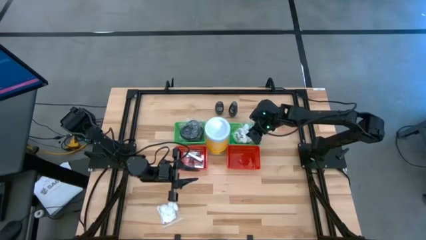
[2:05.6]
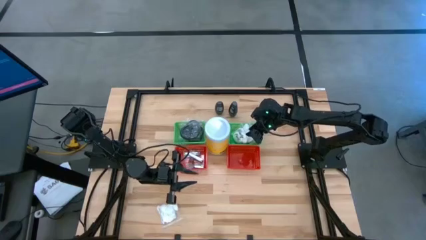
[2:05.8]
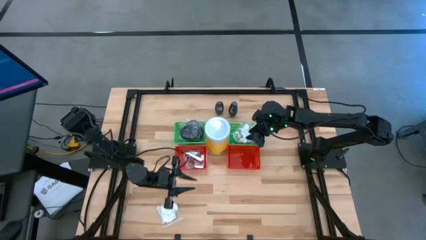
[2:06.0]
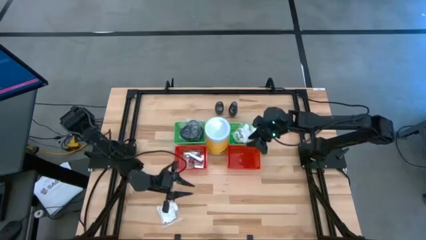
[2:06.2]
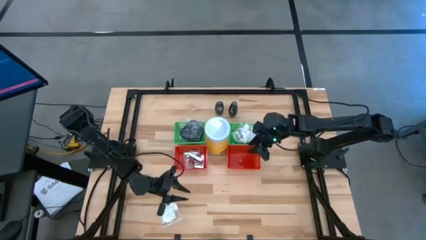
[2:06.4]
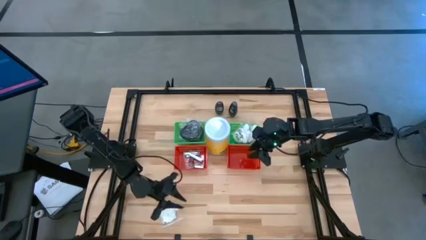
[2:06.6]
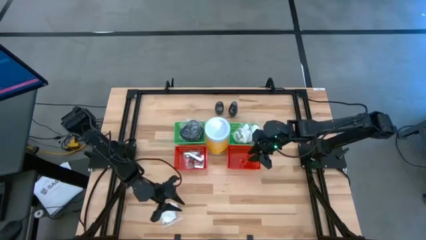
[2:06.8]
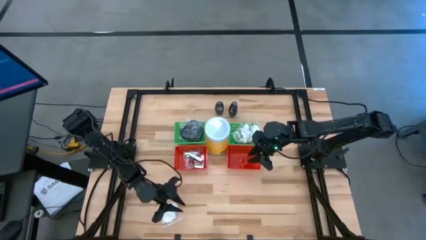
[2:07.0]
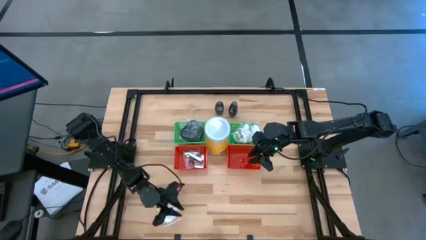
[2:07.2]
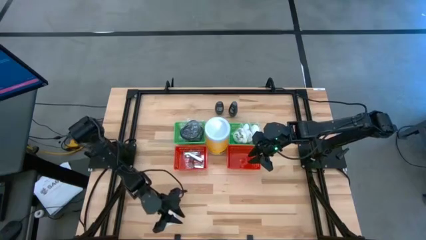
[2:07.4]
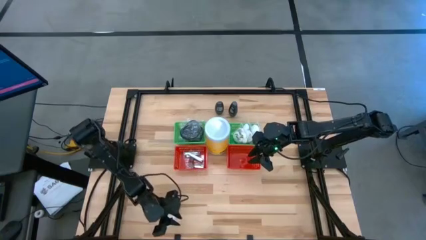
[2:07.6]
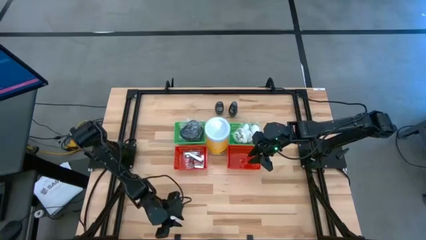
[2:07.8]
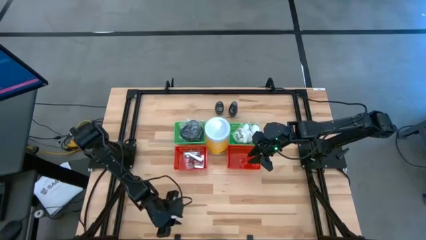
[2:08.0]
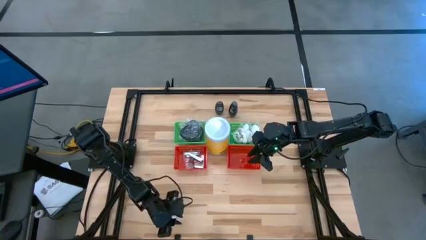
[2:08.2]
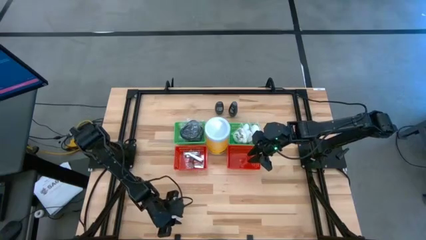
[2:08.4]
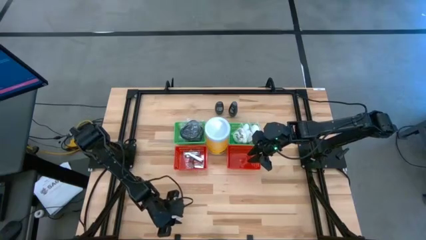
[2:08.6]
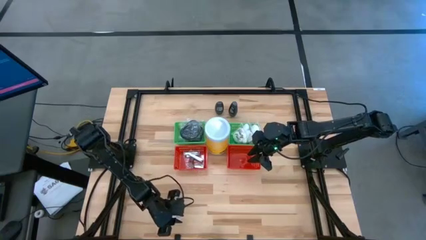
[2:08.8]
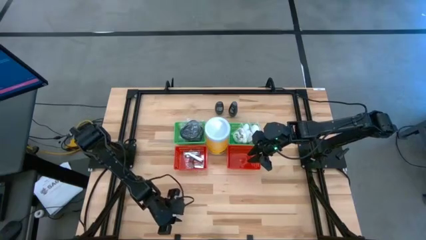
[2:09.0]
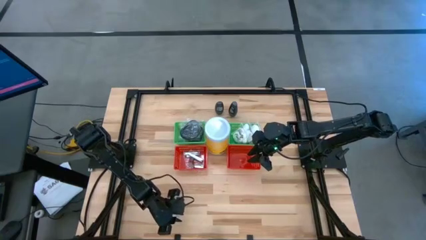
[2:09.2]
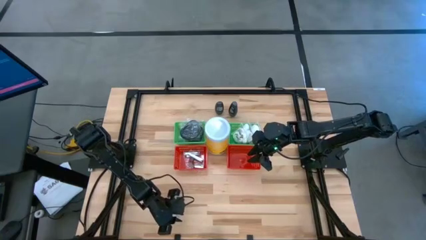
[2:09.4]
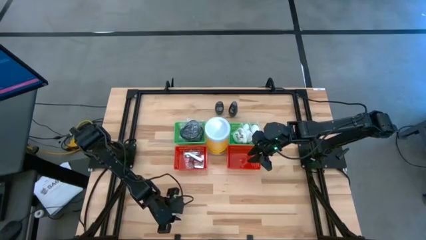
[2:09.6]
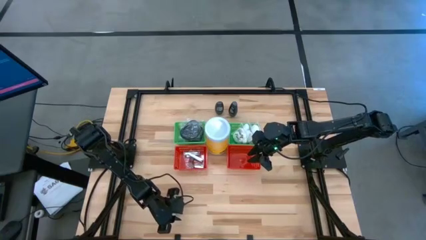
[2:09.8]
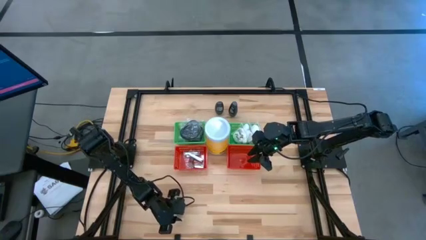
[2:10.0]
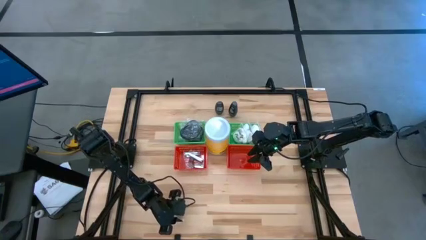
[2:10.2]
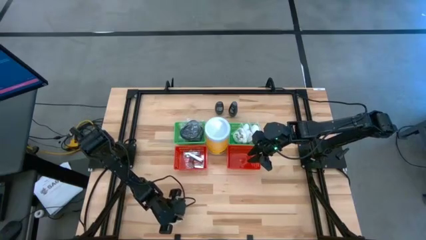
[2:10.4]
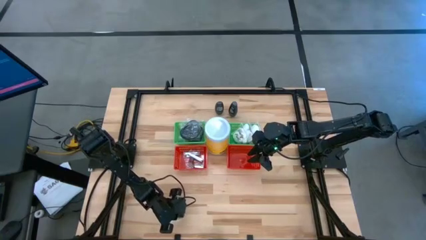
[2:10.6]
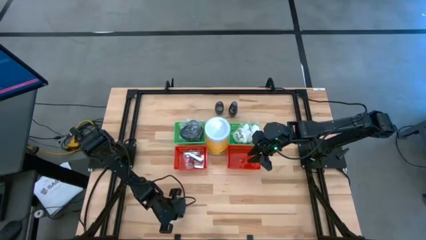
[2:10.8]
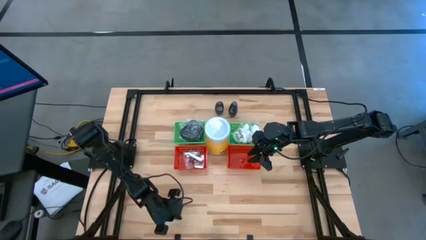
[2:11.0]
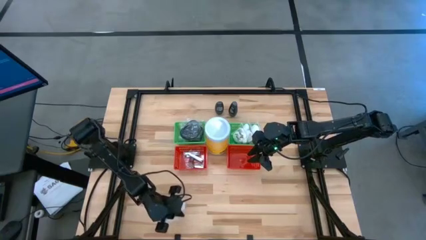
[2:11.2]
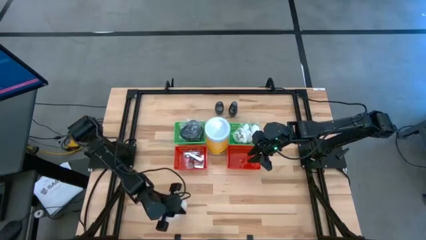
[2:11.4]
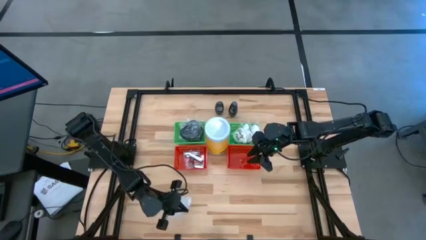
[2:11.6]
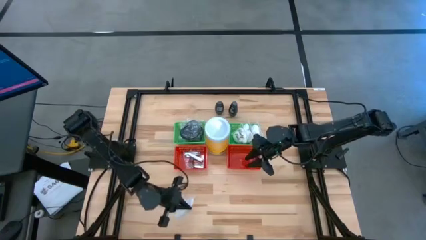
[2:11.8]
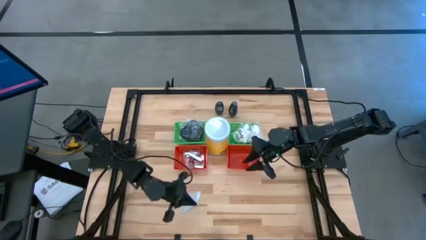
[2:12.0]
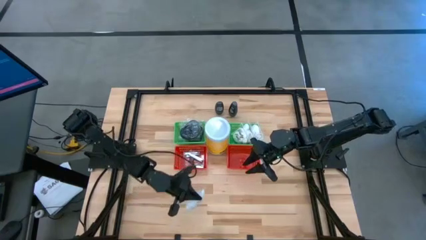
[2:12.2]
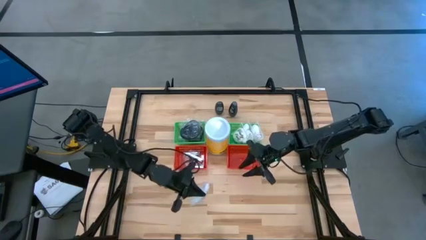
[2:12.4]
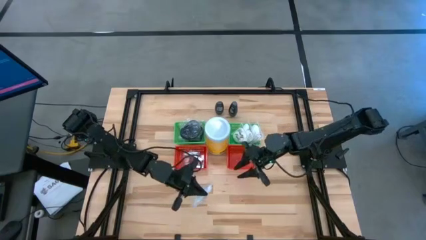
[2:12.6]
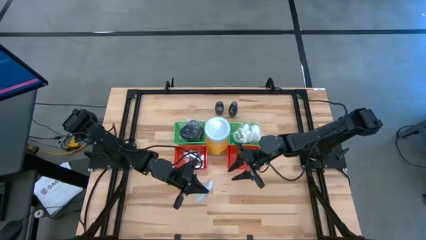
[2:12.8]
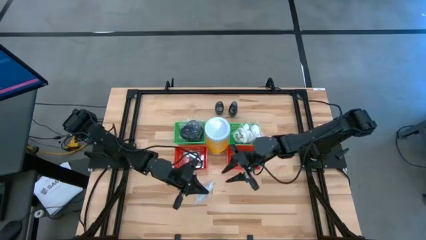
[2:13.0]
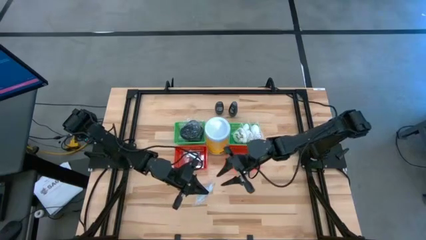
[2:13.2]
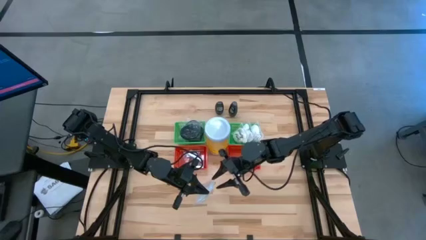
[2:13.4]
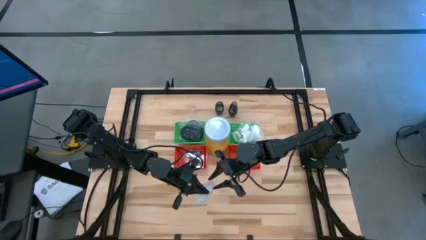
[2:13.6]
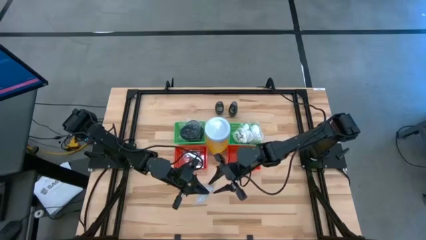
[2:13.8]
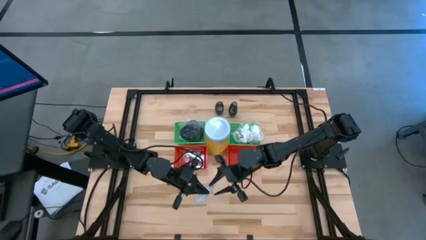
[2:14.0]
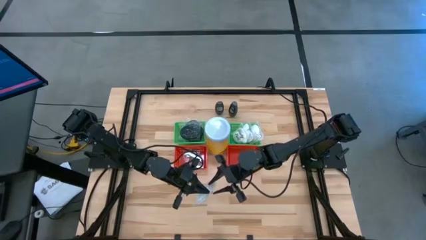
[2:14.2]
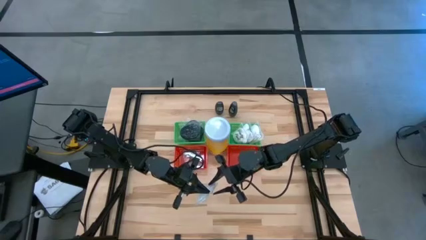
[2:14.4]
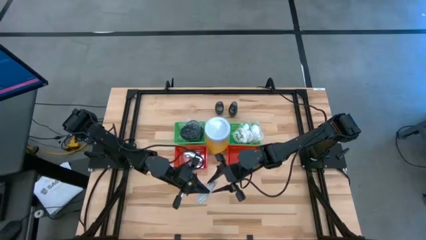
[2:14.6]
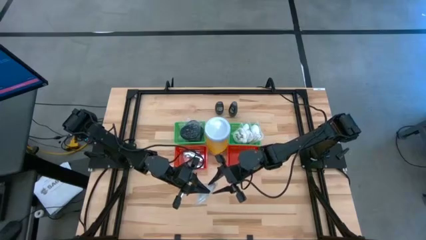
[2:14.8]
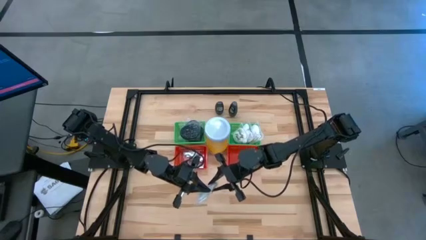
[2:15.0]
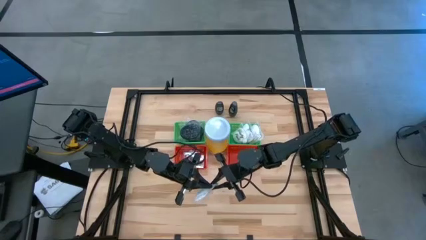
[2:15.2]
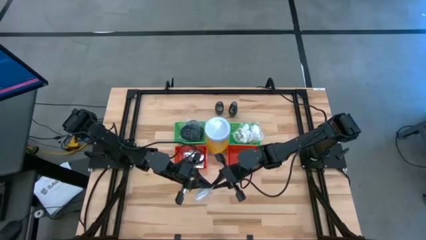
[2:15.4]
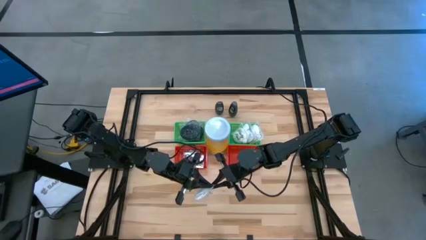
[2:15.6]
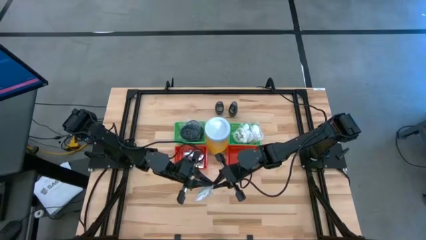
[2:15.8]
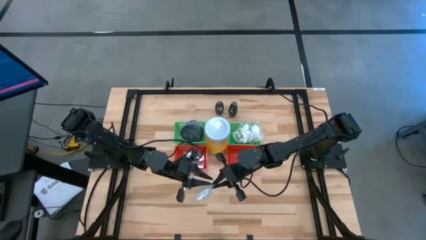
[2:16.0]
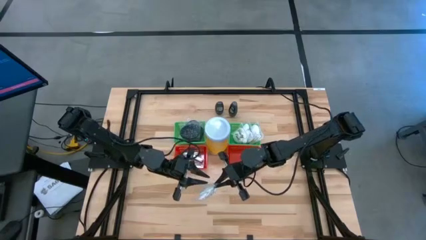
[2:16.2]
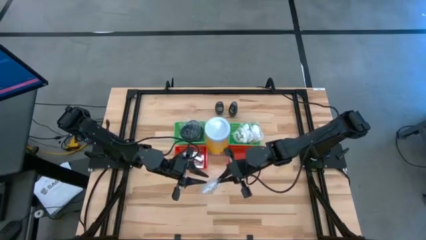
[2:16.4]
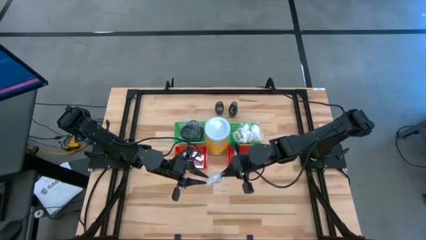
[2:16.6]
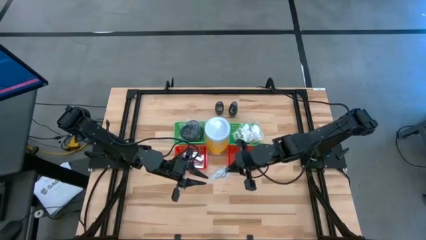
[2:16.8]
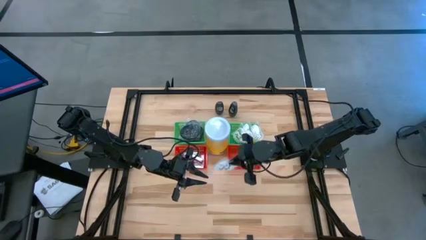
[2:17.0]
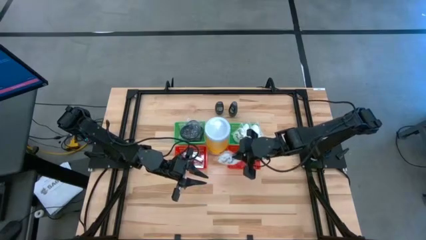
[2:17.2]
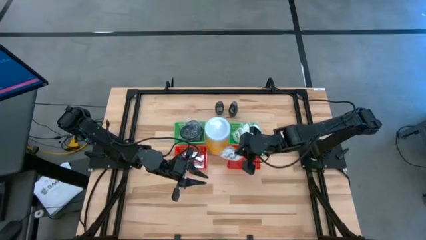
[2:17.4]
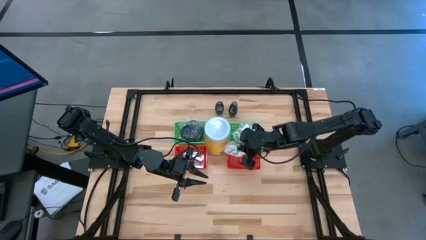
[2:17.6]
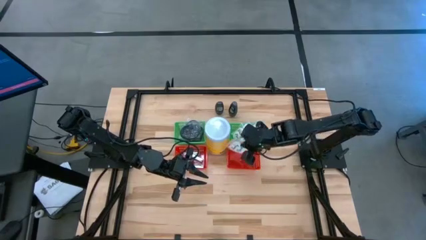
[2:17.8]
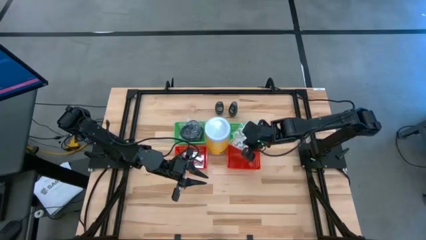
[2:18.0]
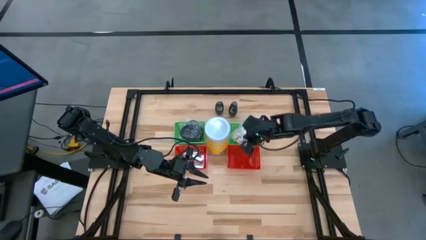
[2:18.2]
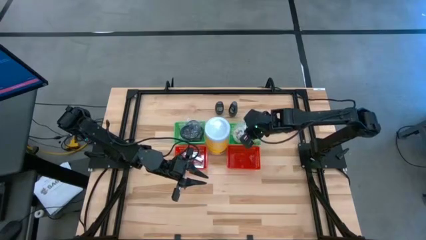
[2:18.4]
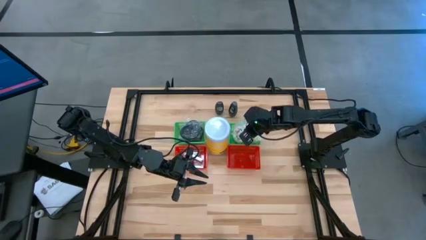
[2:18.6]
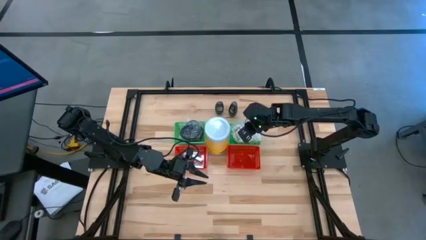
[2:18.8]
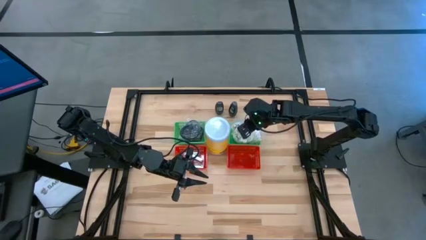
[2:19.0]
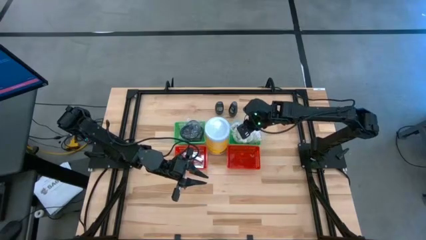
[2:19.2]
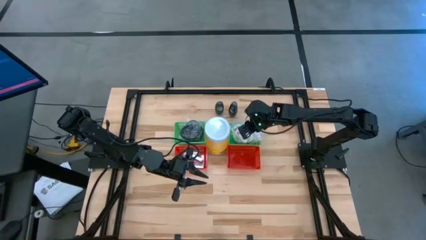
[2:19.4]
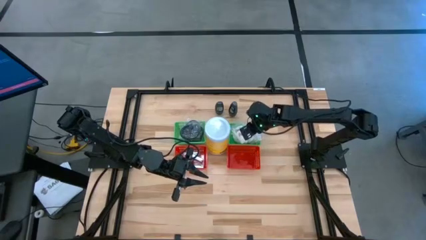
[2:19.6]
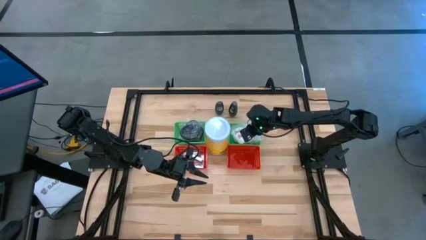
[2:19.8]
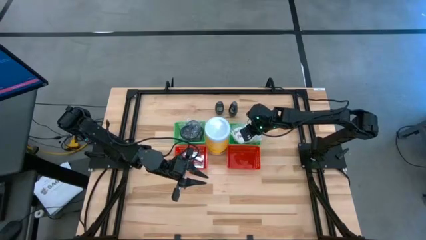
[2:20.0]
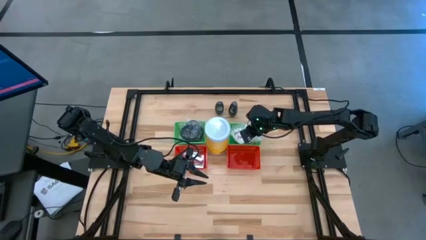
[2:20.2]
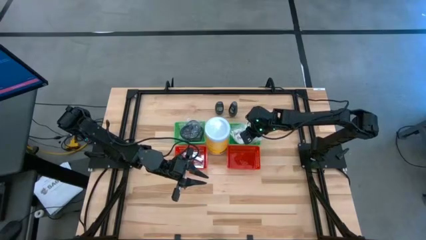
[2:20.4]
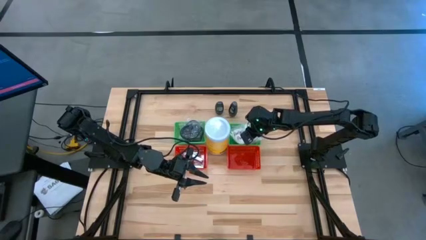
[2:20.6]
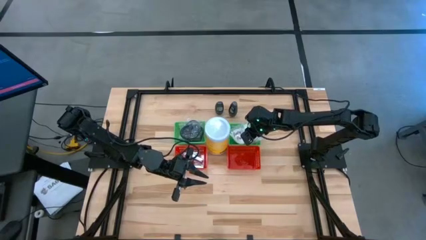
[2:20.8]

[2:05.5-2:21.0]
Task: Pick & Place Travel size toiletries
Put the vanity pack into the right green basket
